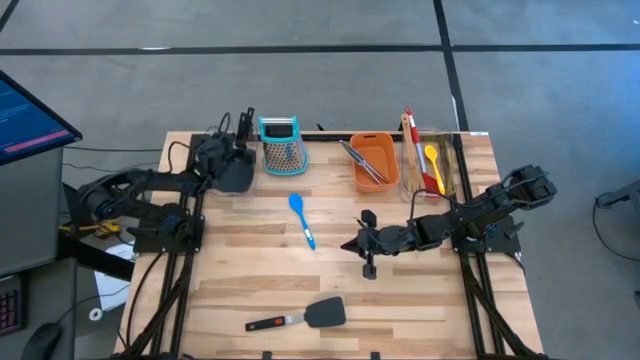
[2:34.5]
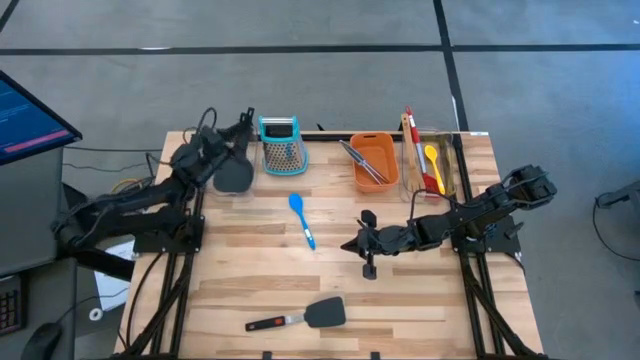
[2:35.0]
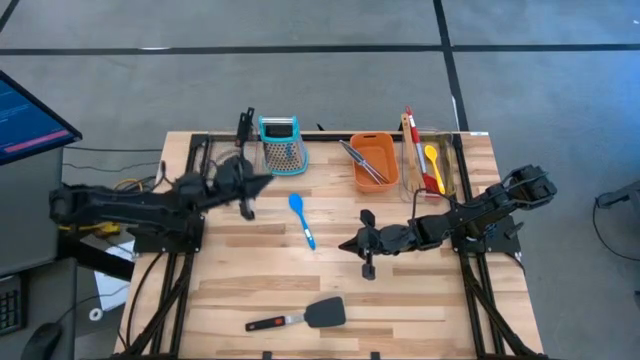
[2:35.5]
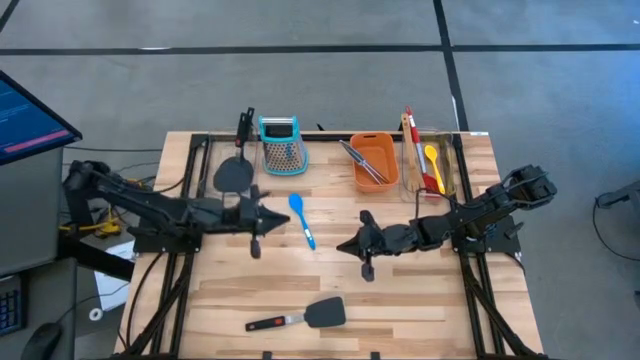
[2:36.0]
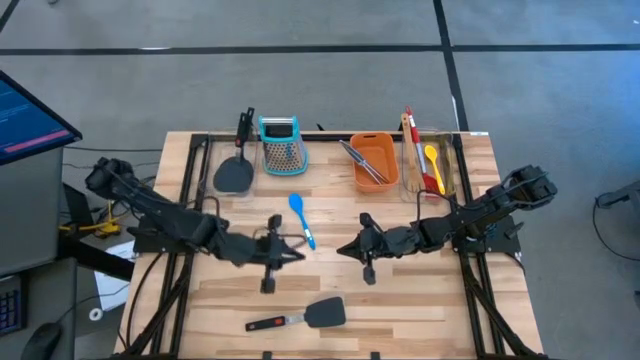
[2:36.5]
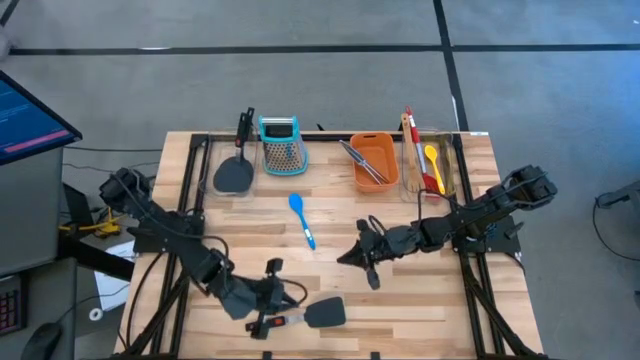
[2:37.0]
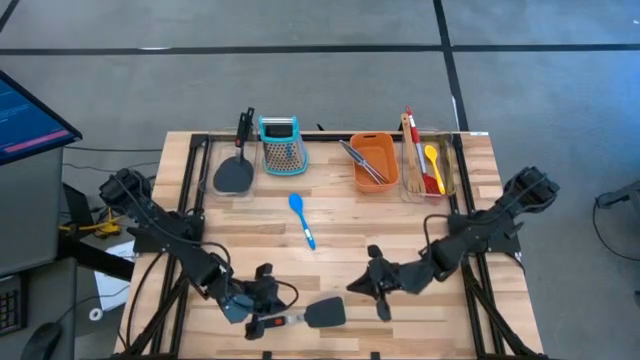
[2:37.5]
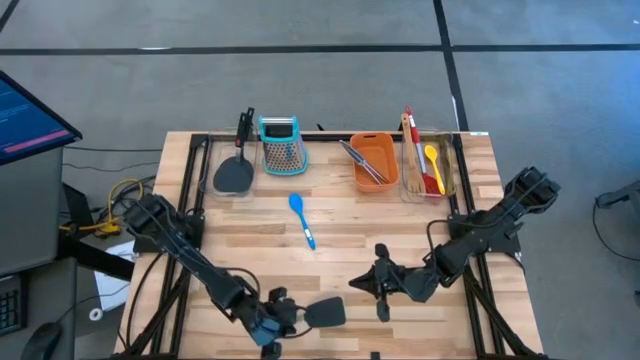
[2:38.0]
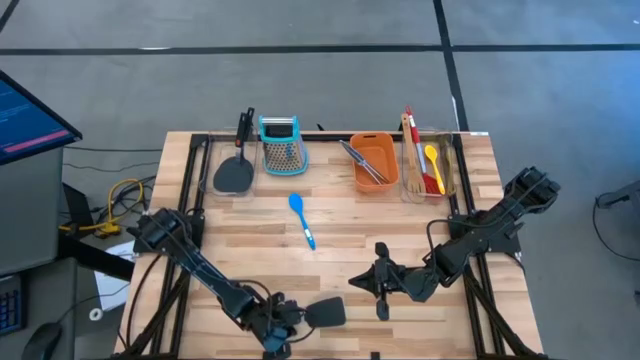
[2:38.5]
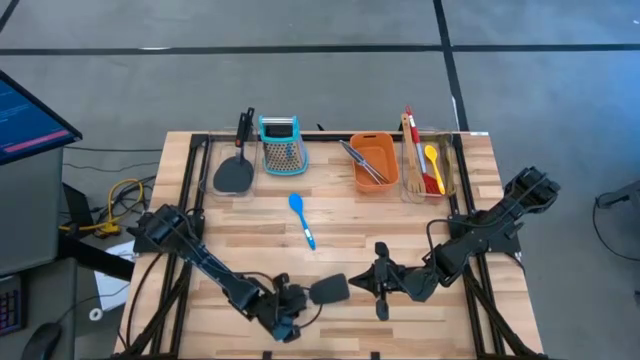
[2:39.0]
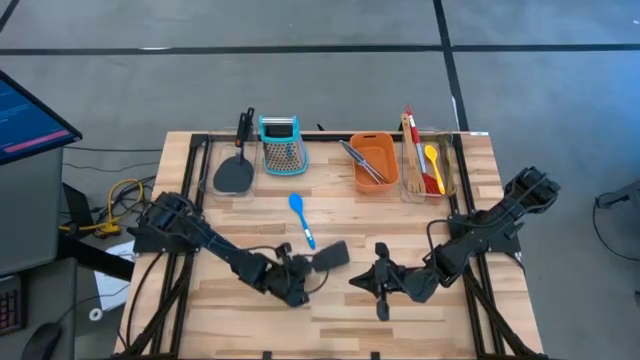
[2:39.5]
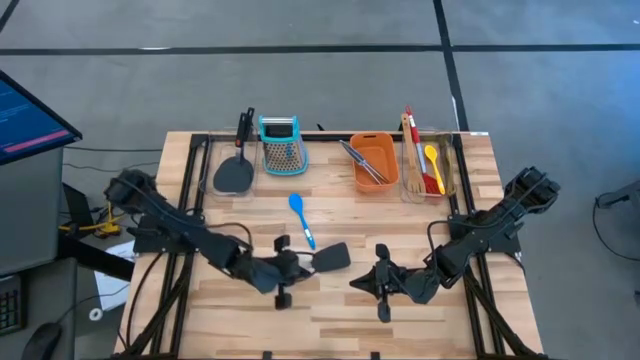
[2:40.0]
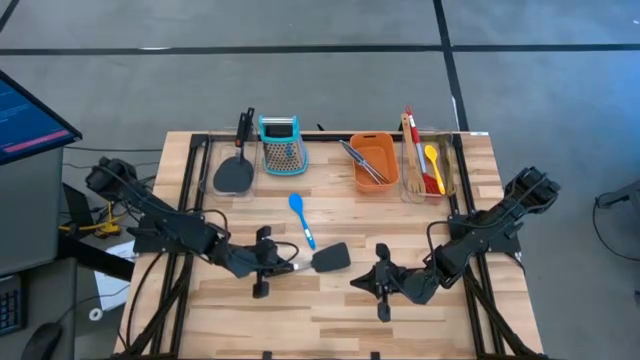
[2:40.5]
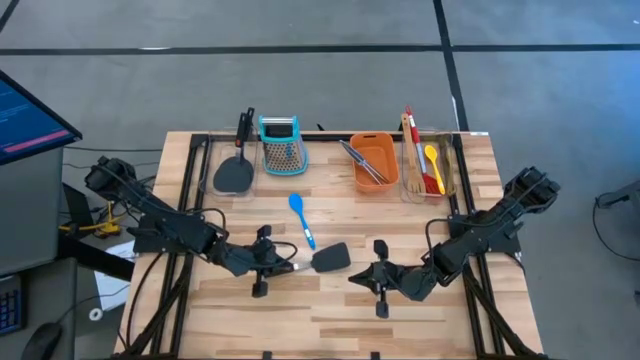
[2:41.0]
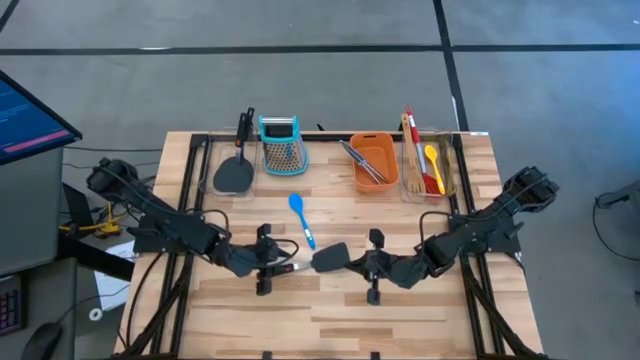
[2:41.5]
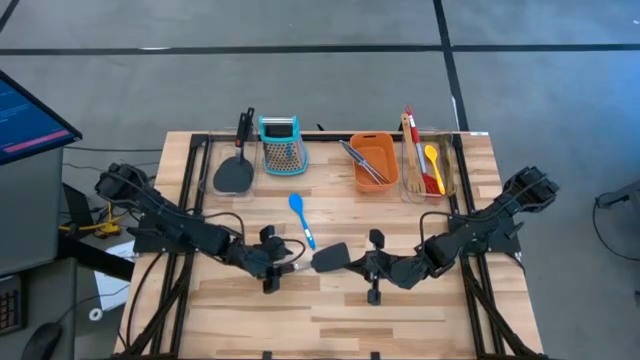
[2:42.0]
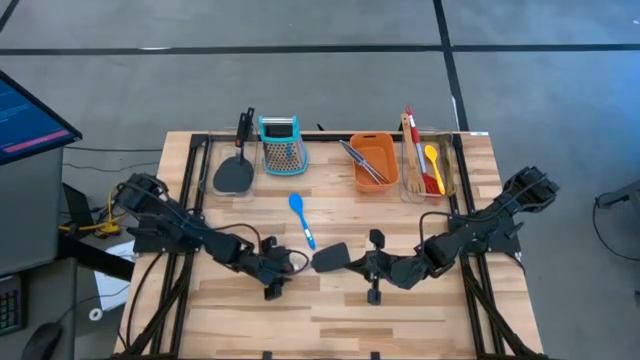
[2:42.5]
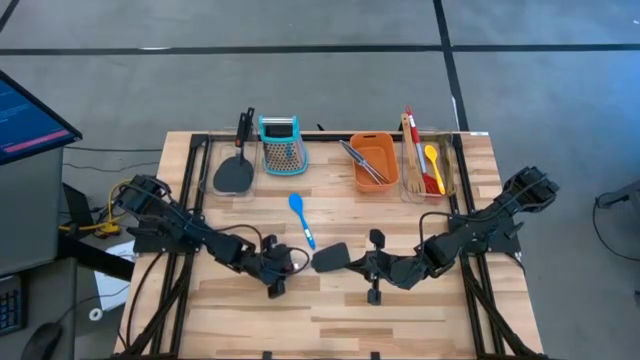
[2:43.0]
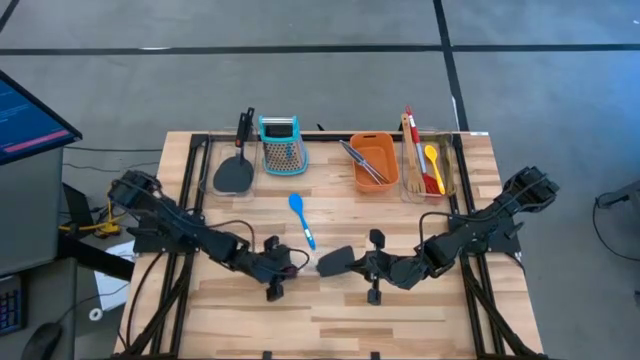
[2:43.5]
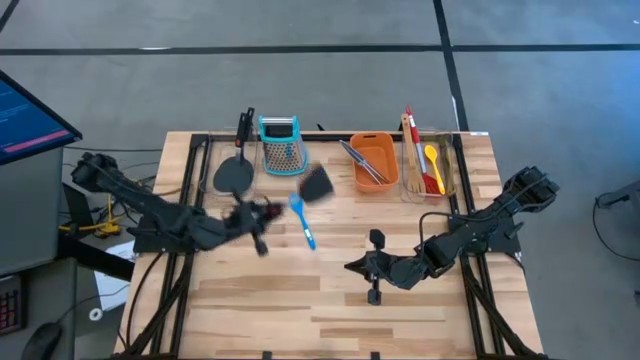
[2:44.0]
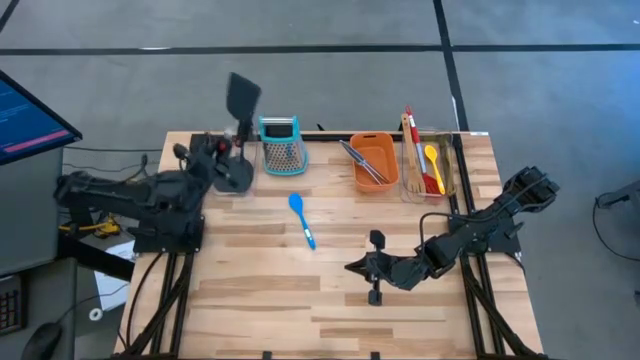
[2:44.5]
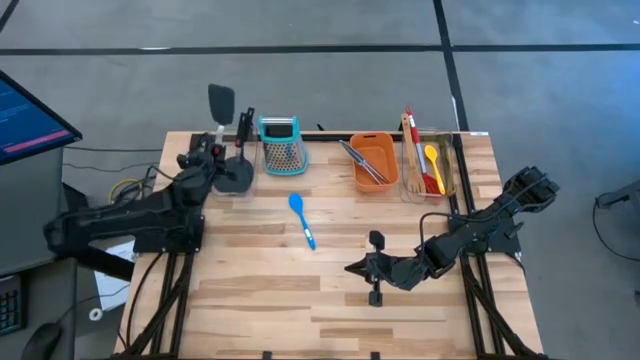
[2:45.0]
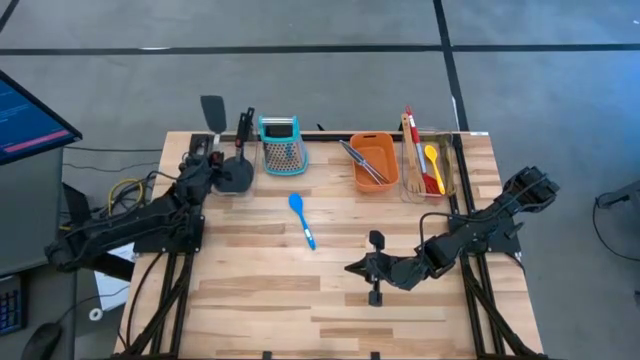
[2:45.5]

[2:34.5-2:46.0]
Task: Pick & Place Kitchen Items
Put the black spatula into the left transparent bin

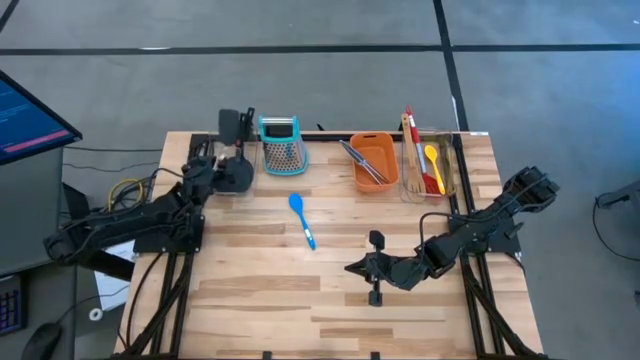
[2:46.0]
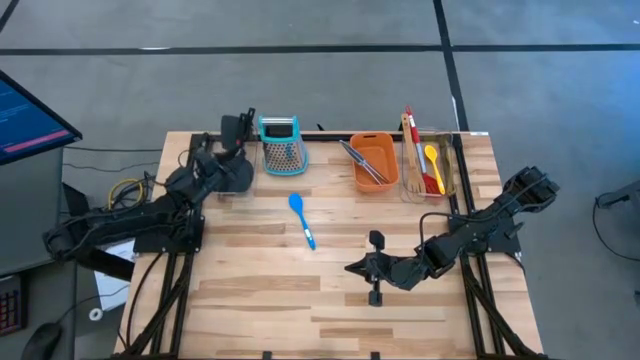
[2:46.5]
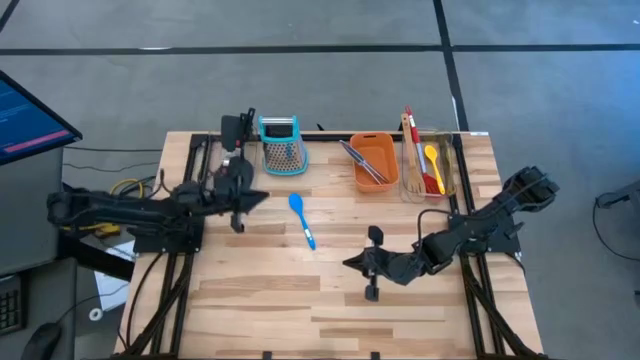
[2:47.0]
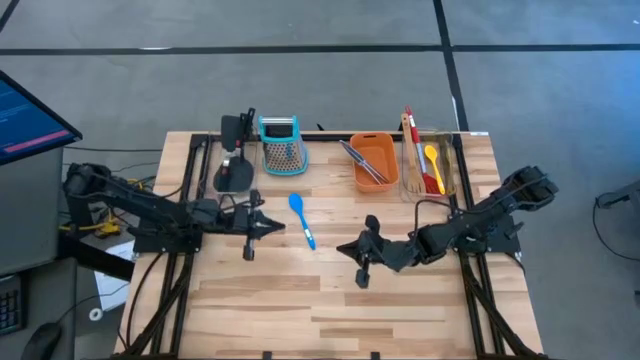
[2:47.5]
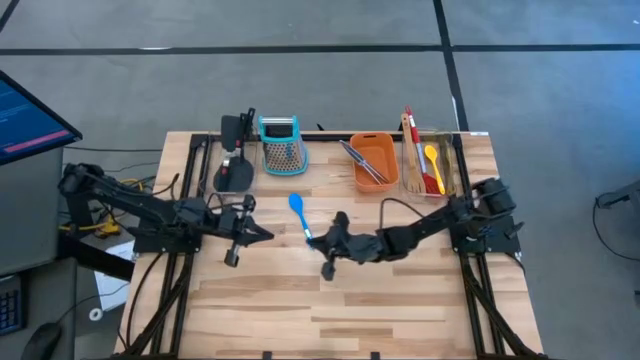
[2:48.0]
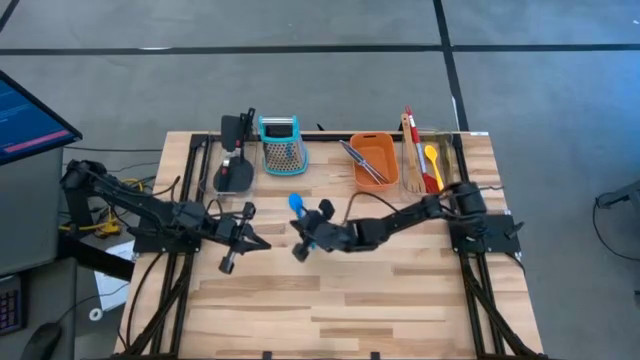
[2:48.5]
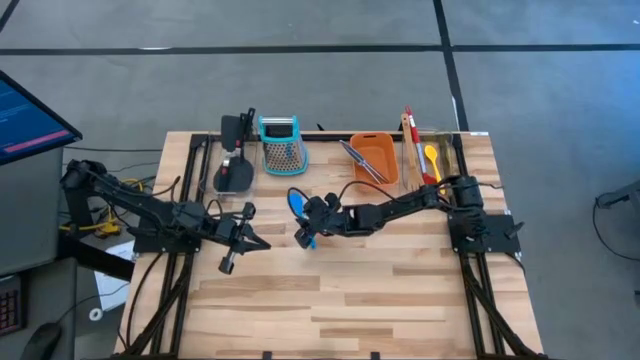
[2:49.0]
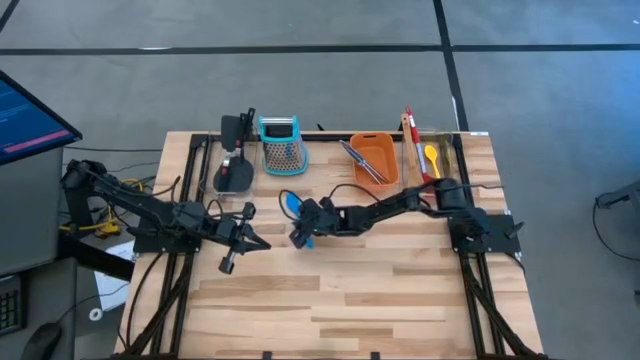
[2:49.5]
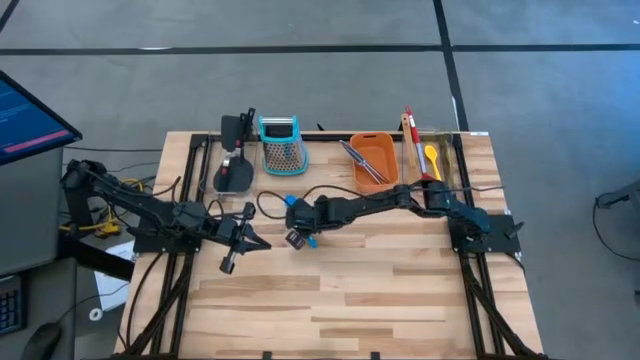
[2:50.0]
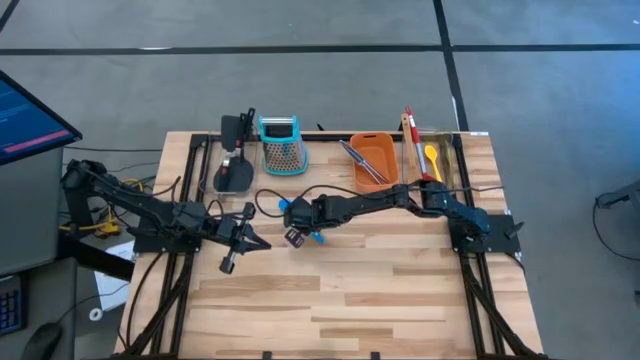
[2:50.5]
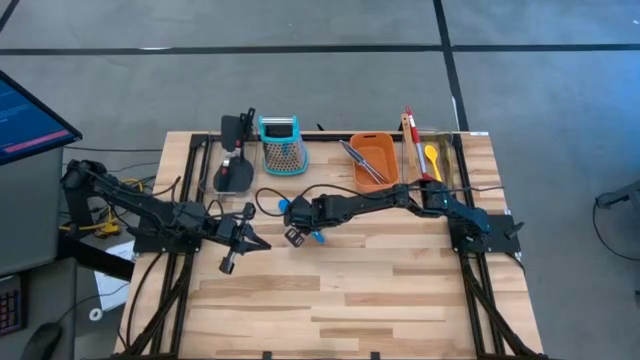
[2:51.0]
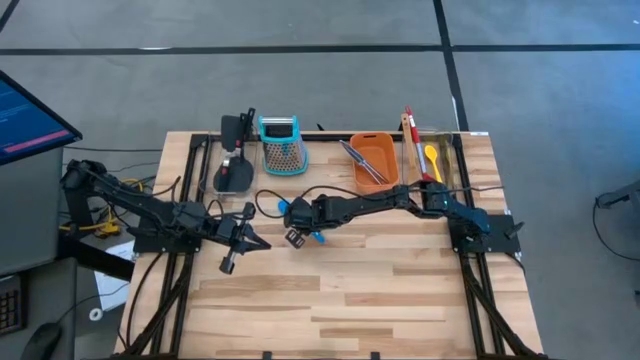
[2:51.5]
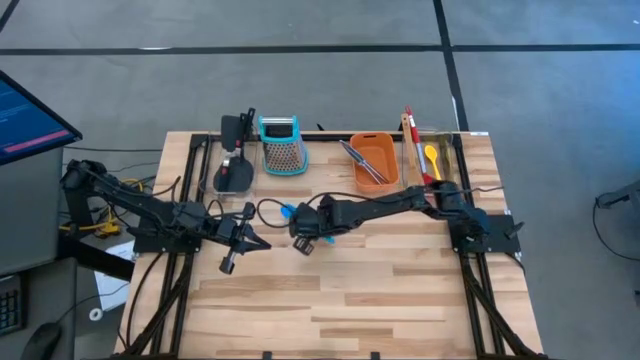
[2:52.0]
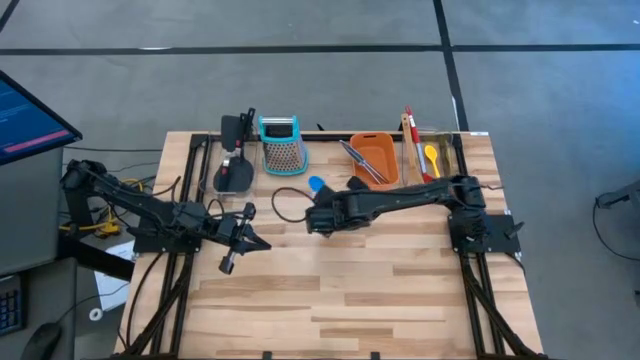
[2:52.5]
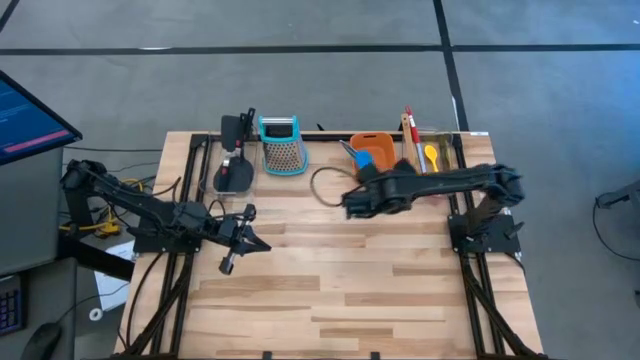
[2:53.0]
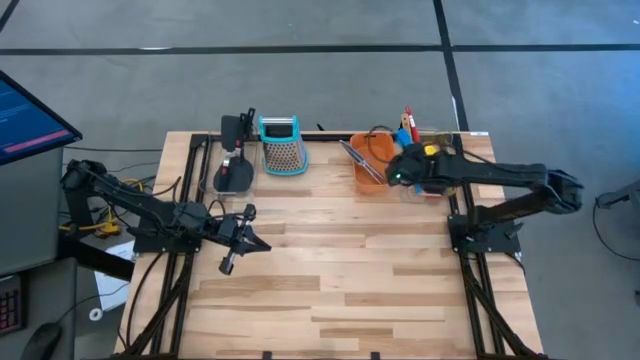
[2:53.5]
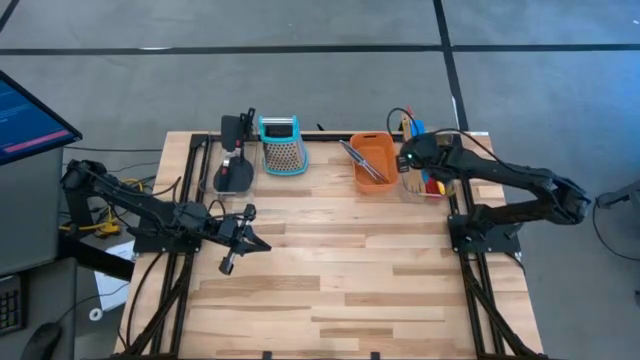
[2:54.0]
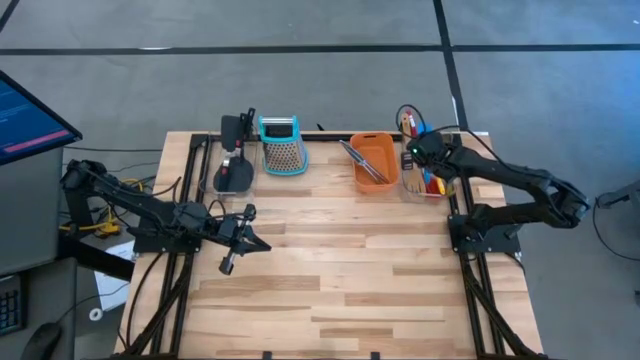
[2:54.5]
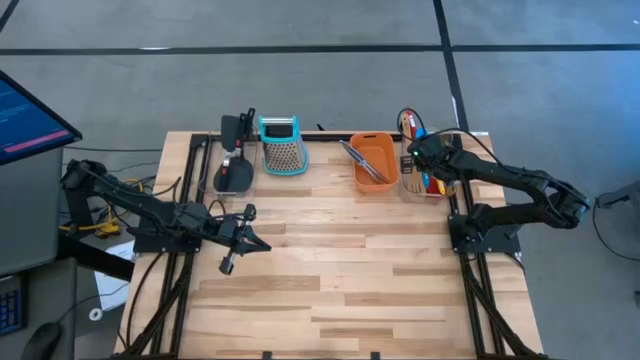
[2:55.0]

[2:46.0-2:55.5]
Put the blue serving spoon into the right transparent bin

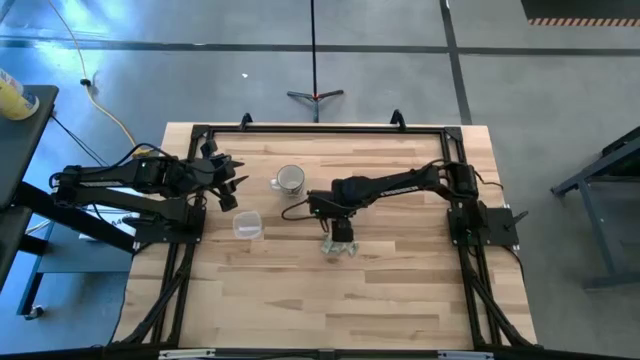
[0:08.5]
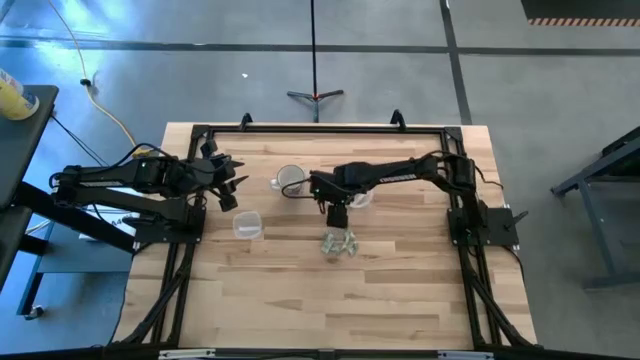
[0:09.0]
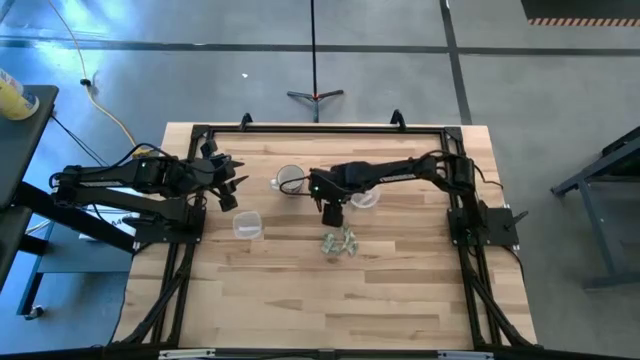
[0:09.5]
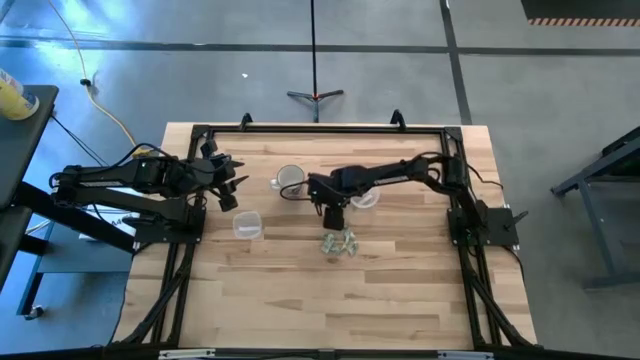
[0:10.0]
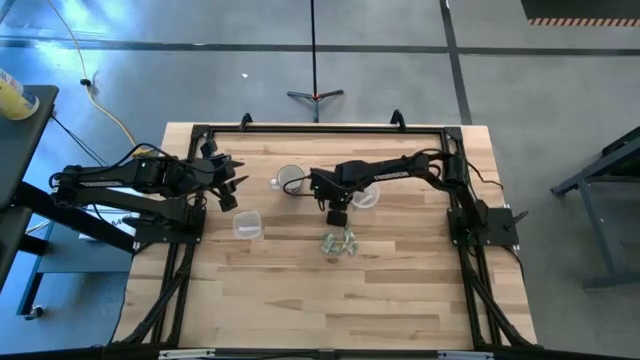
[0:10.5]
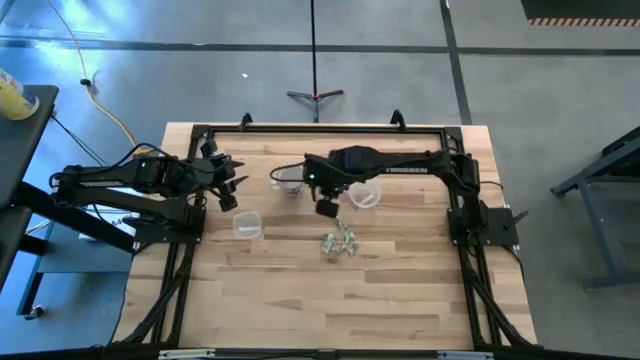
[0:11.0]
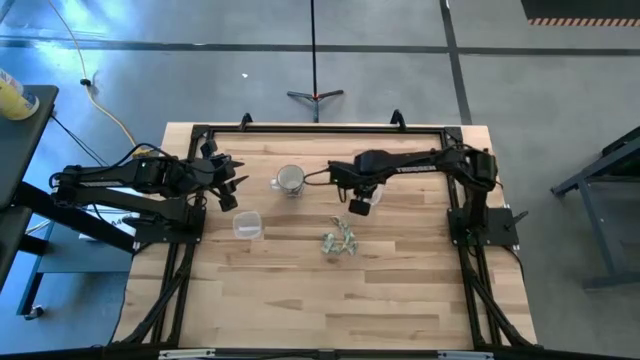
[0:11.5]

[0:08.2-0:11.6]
Task: Pick and place Stevia / Truvia into bins
Put the white stevia packet into the transparent container
